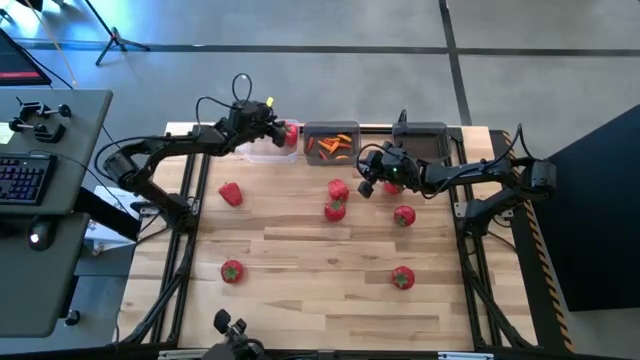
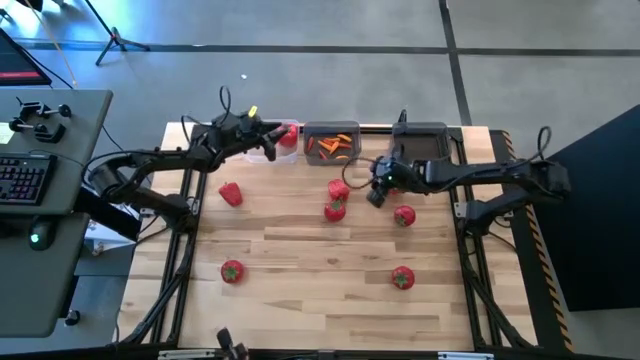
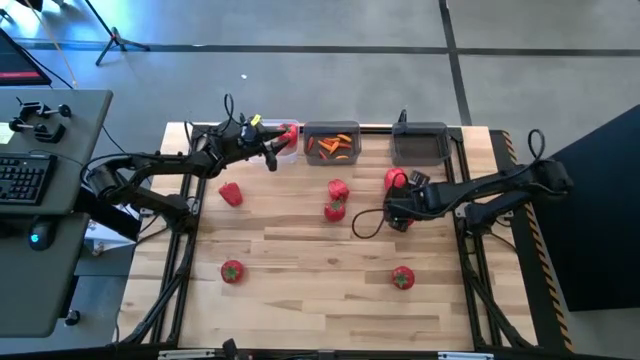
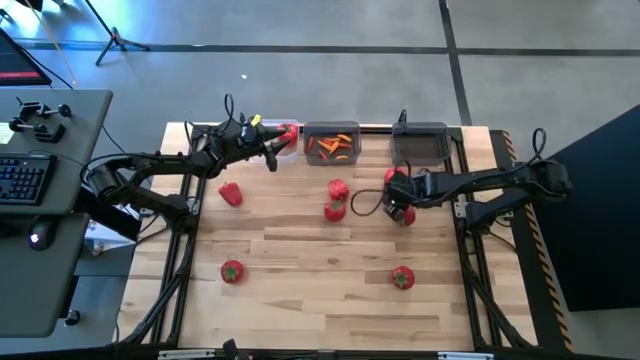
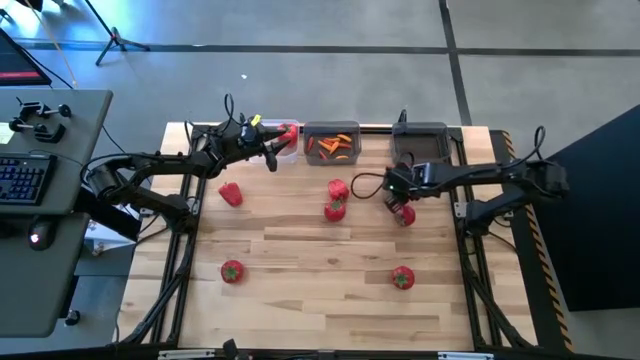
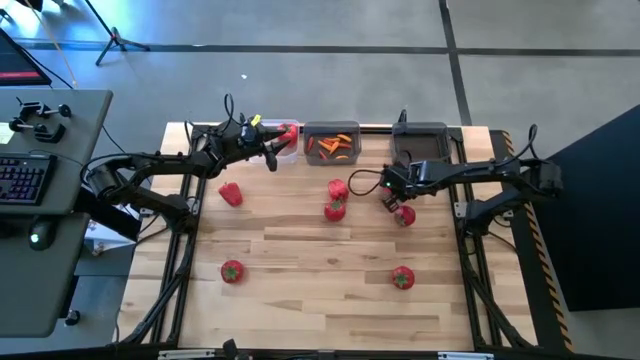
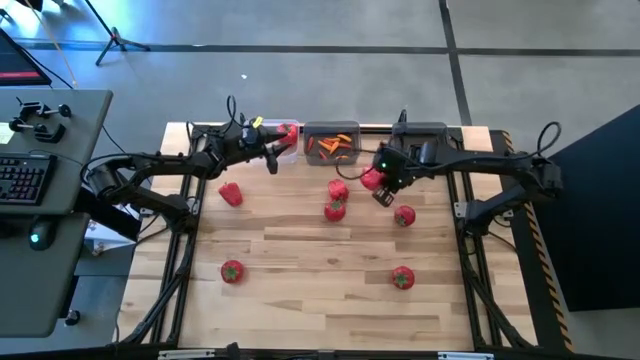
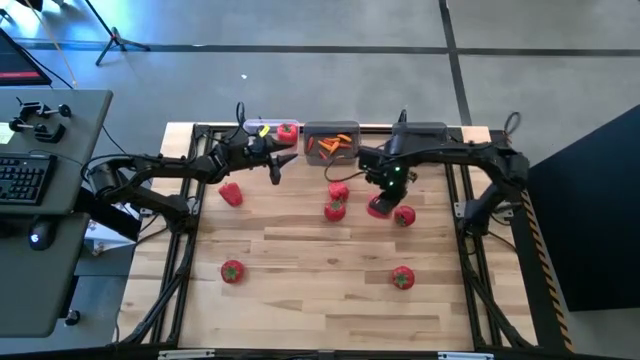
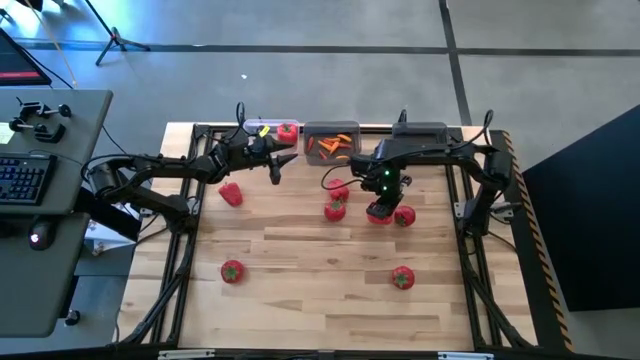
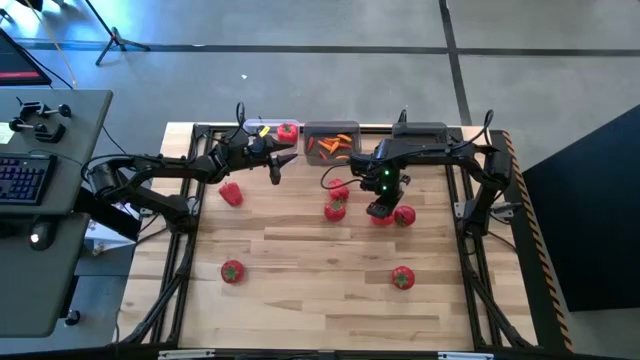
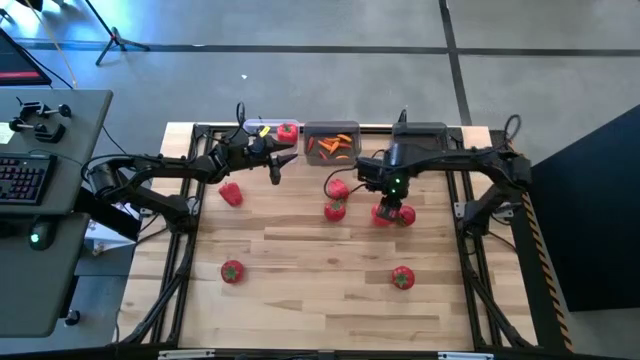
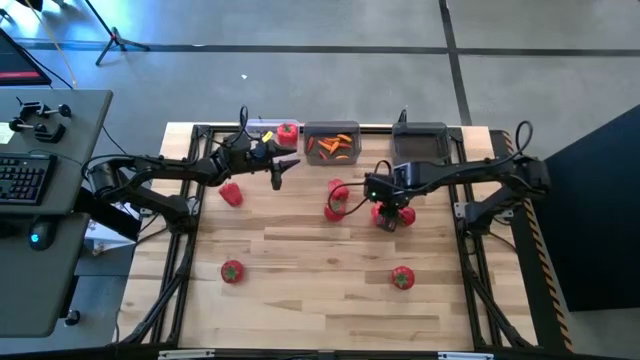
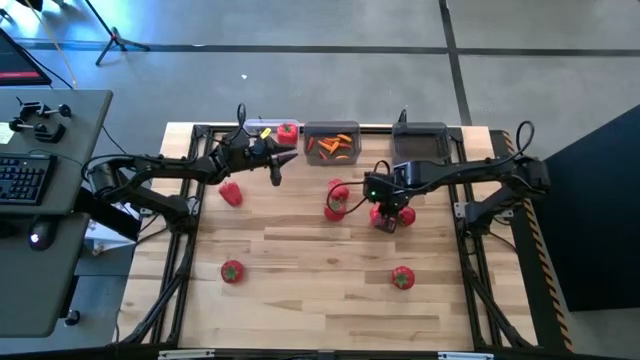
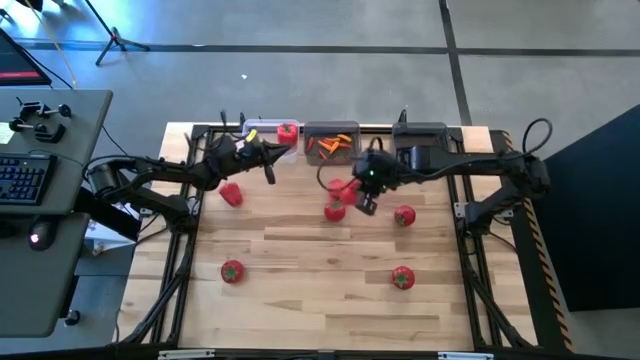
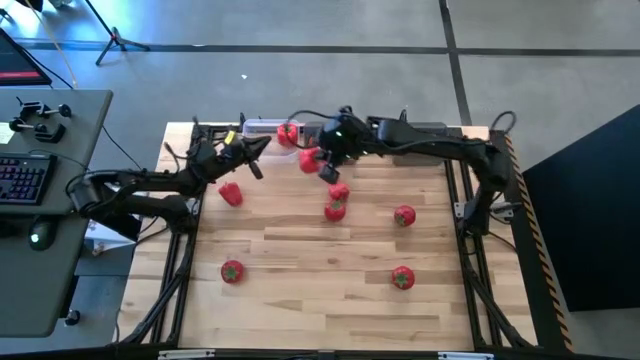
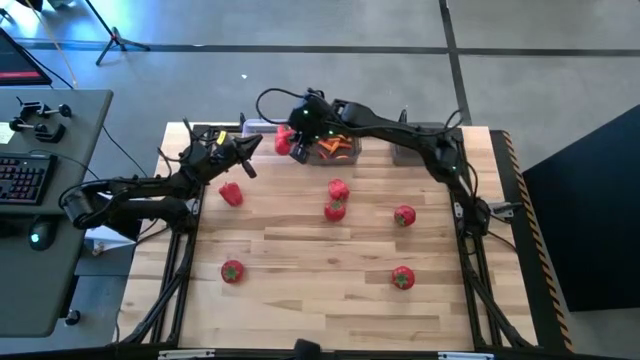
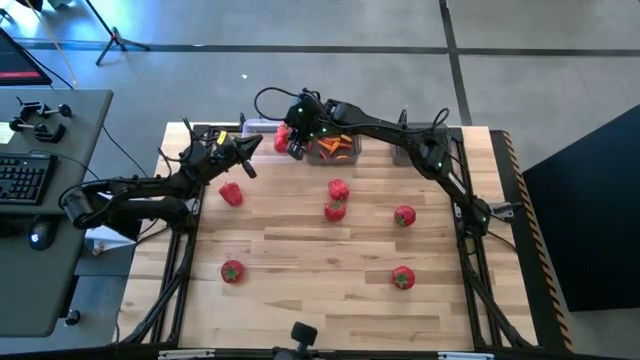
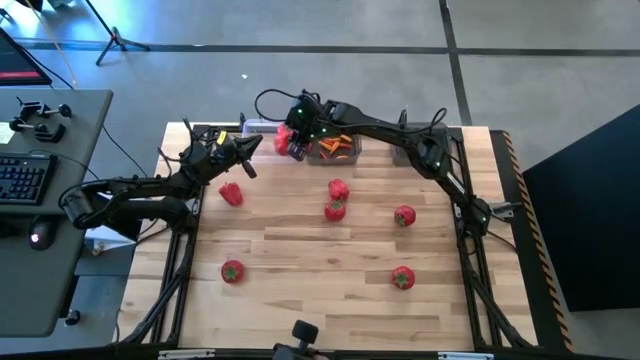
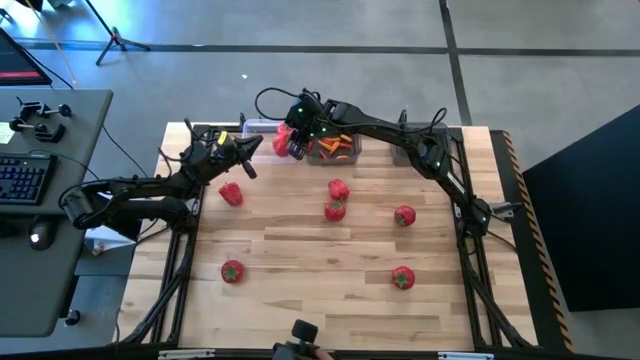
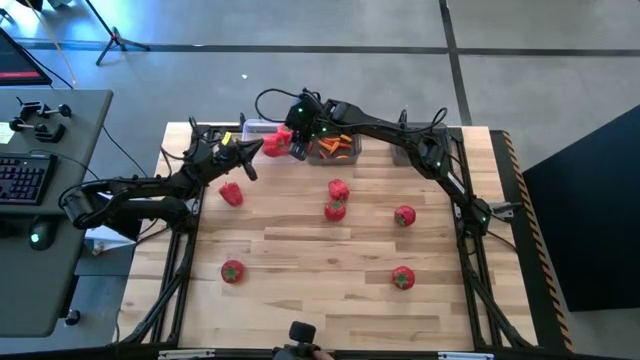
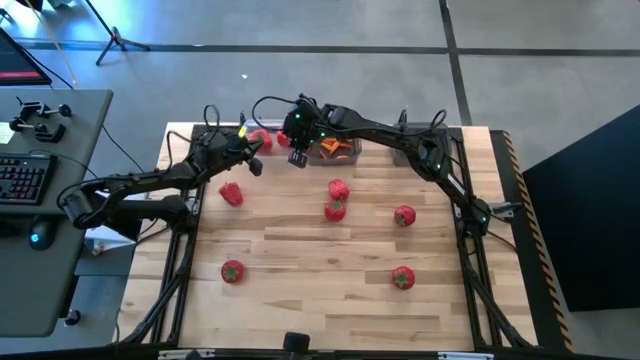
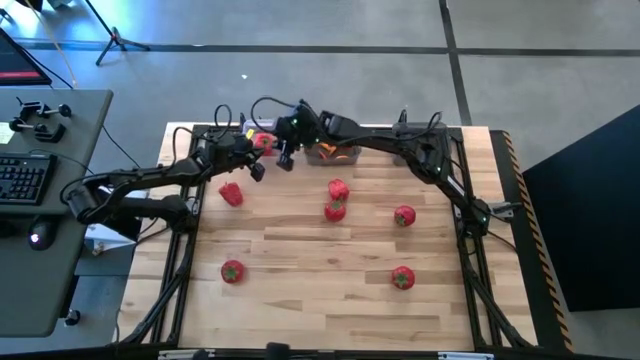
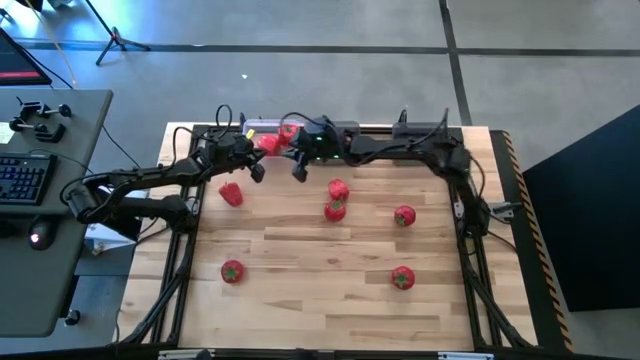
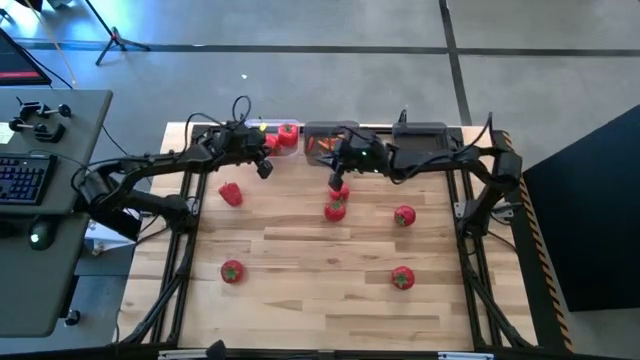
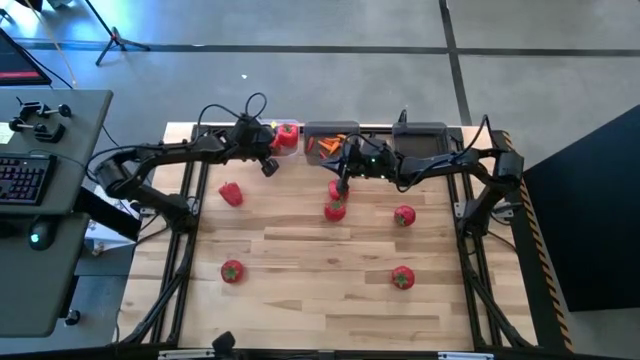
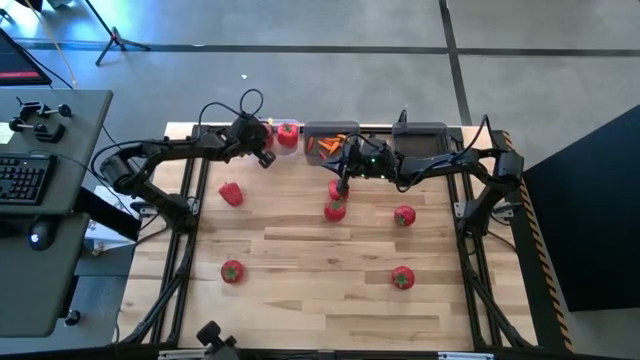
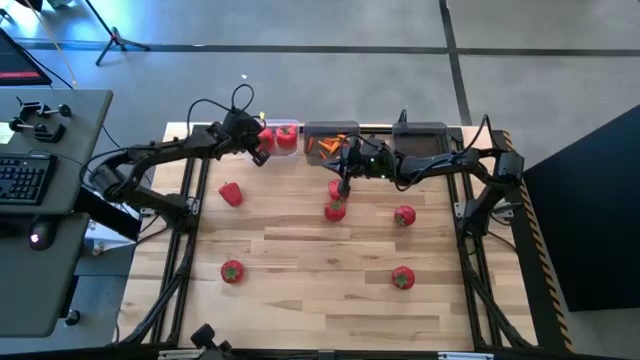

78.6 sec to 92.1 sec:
Task: Sort produce into baskets
Put the red bell pepper into the transparent bin

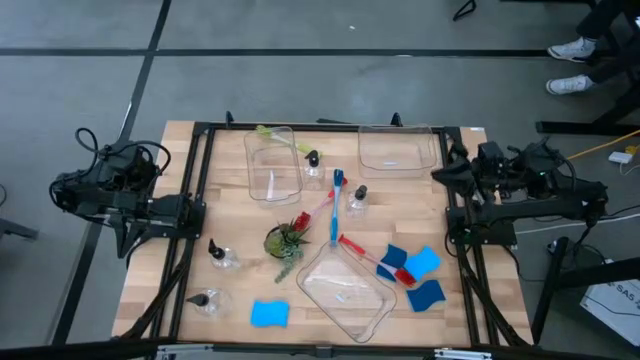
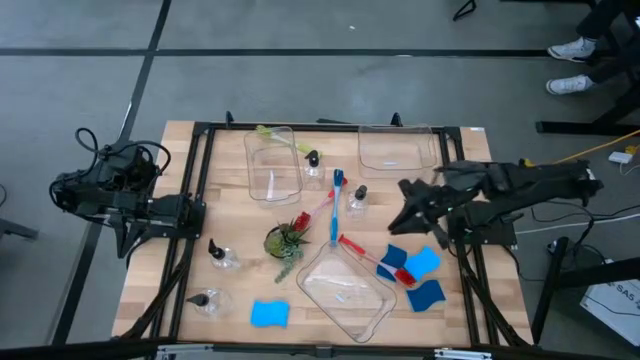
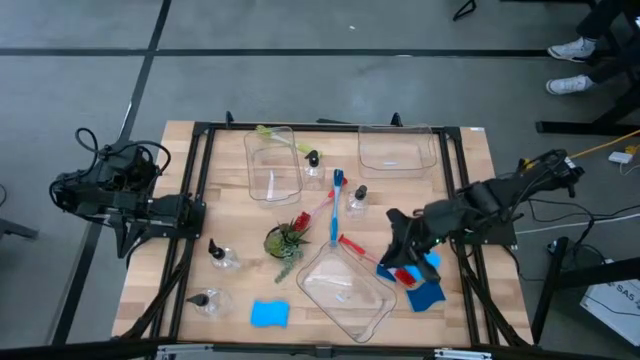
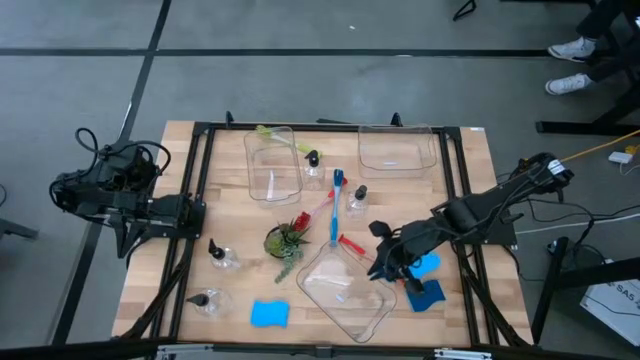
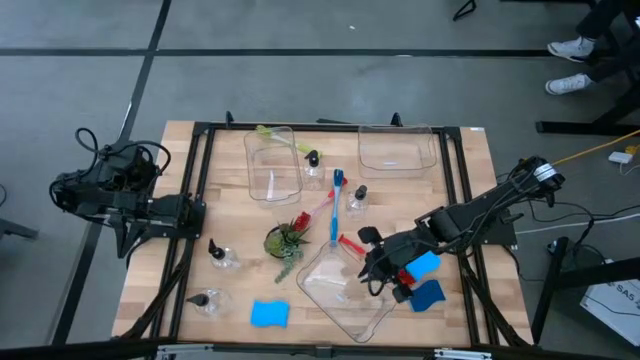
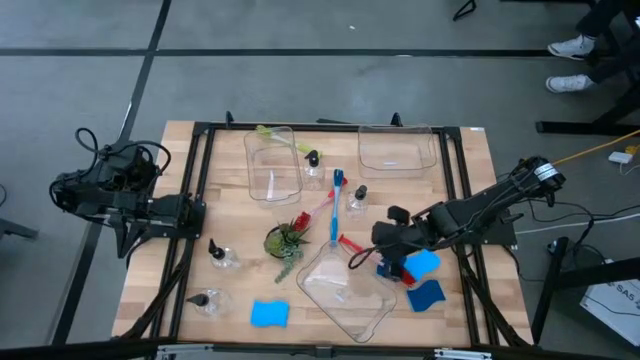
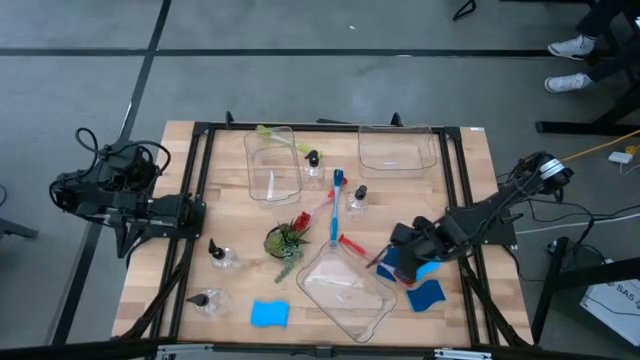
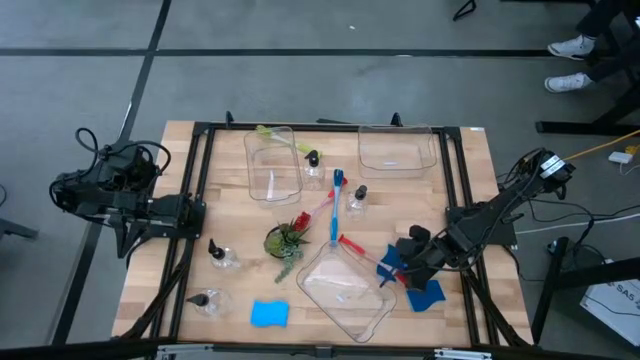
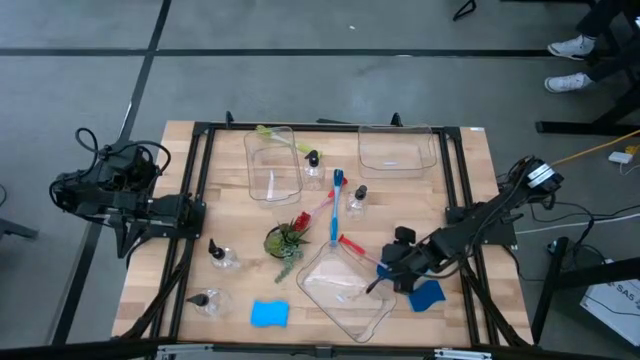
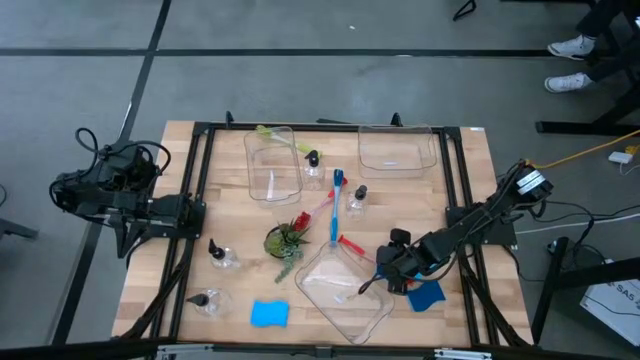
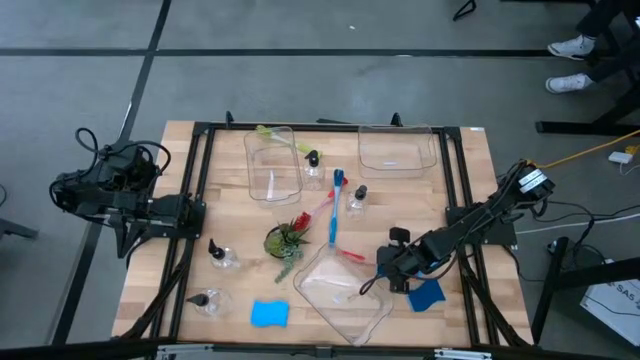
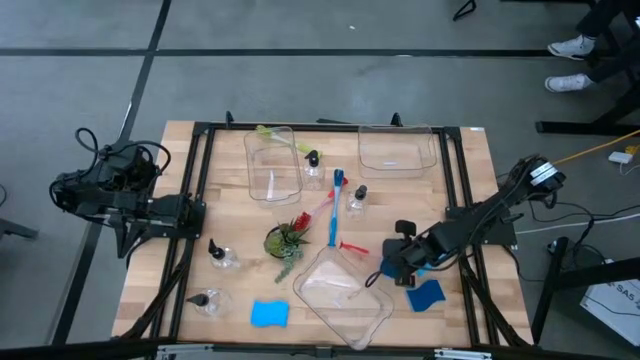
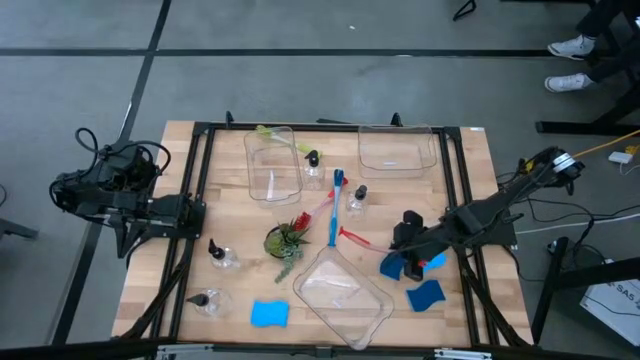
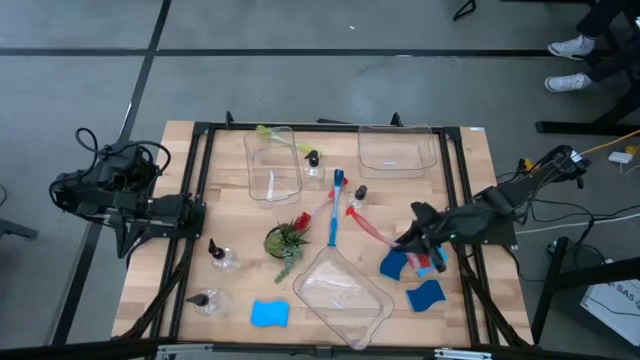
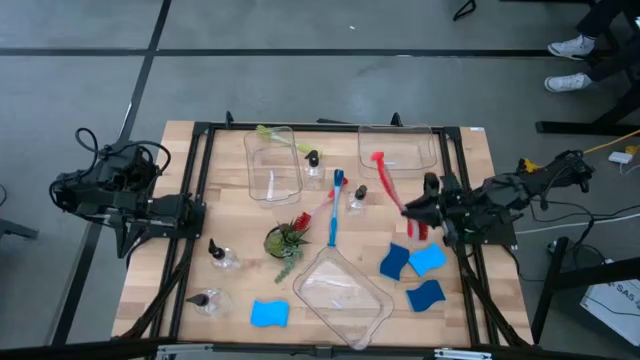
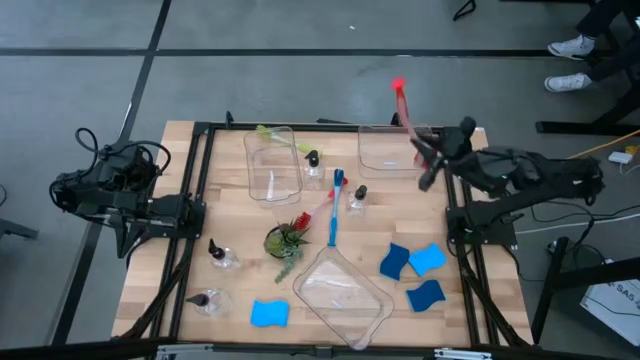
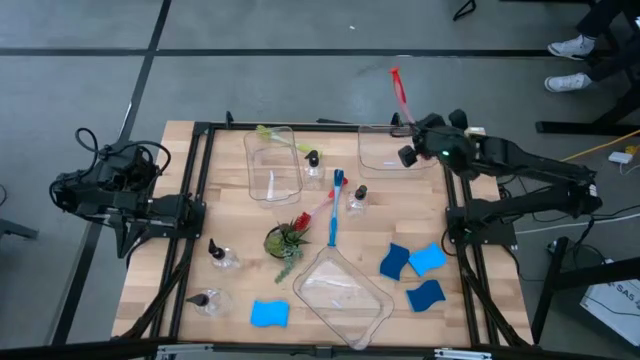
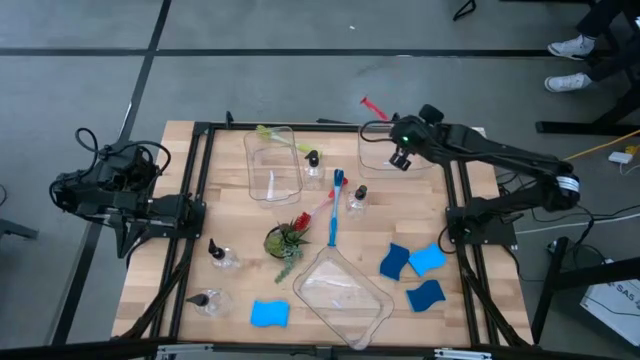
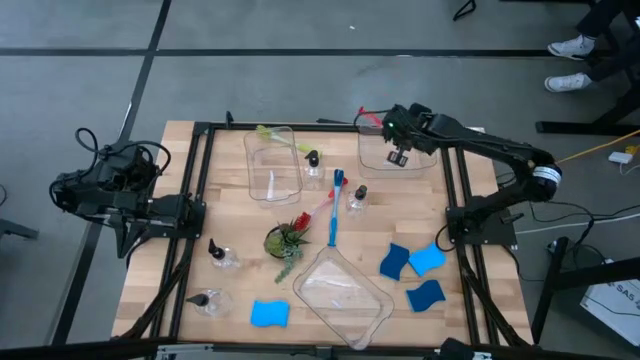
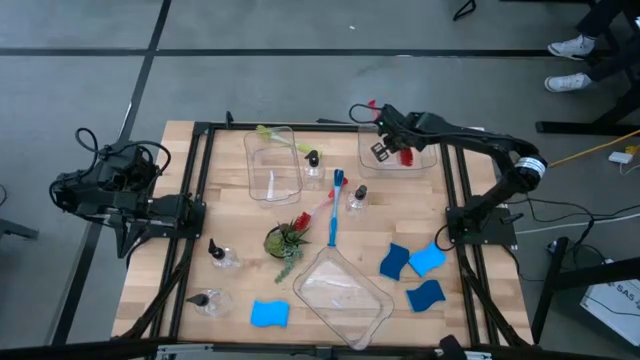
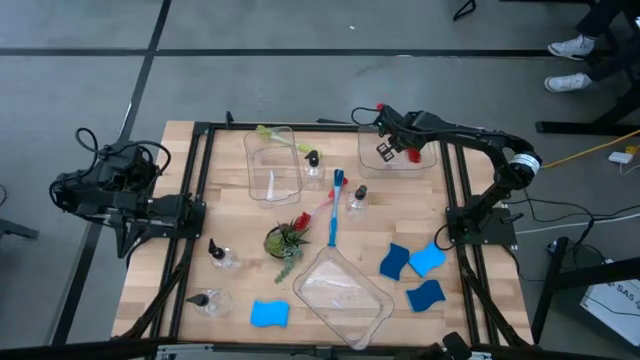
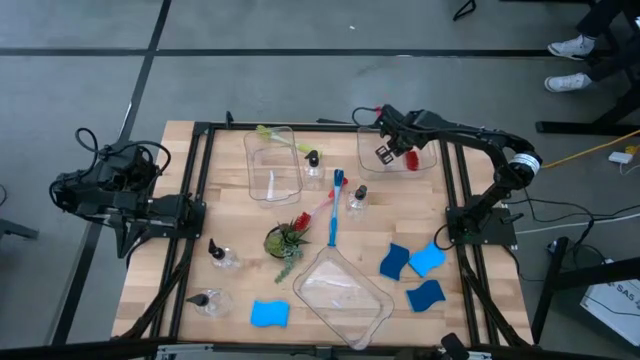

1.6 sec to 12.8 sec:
Task: Pick & Place Kitchen Sink Supplies
Put the orange dish brush into the top right transparent bin
